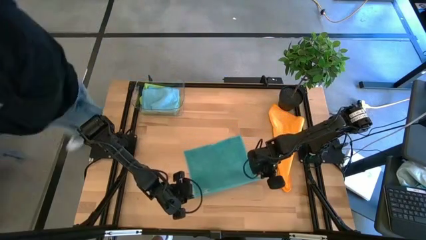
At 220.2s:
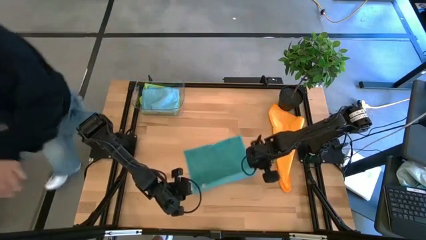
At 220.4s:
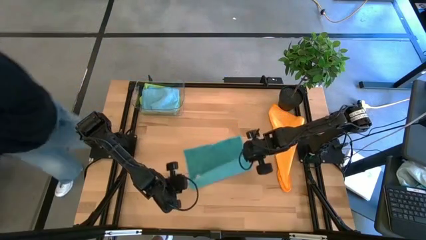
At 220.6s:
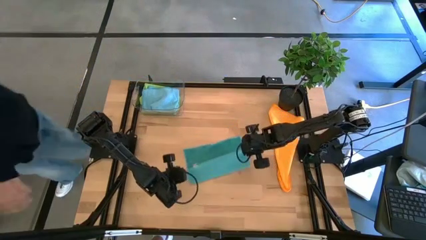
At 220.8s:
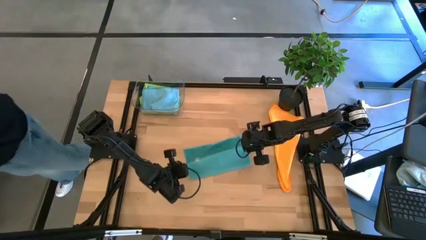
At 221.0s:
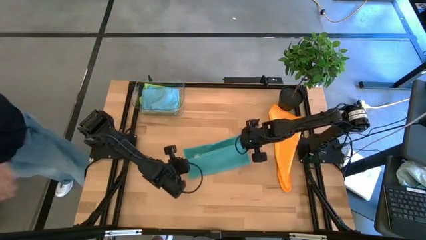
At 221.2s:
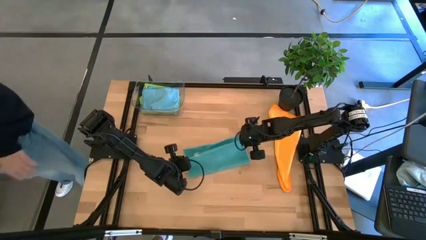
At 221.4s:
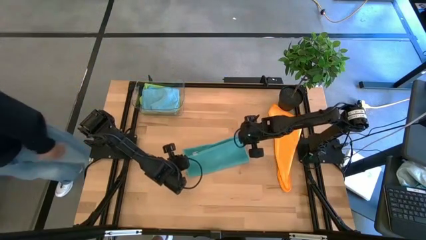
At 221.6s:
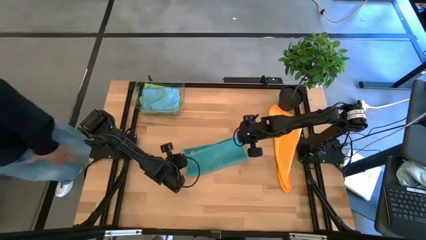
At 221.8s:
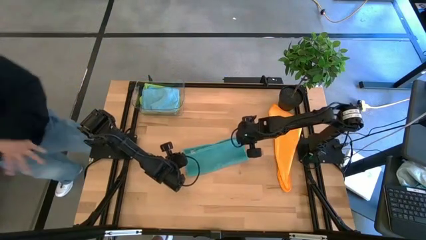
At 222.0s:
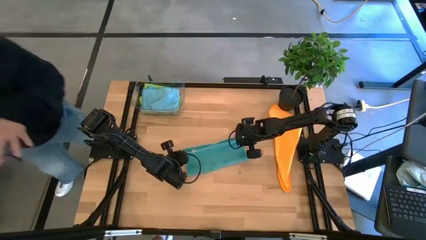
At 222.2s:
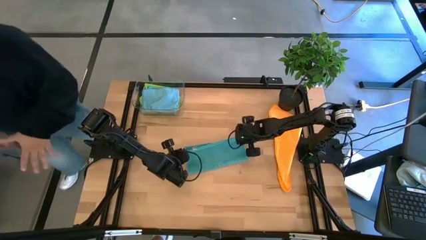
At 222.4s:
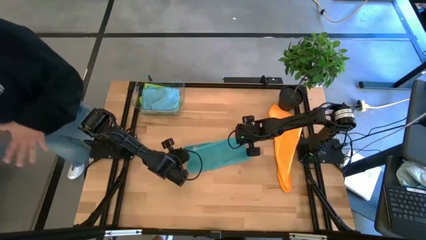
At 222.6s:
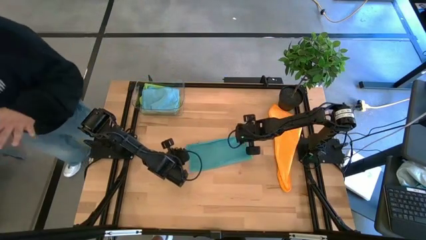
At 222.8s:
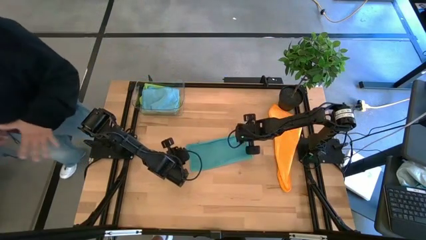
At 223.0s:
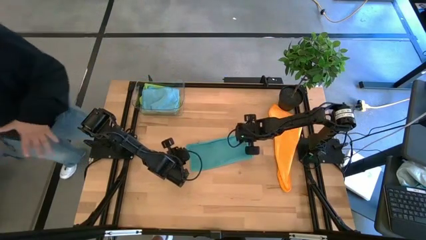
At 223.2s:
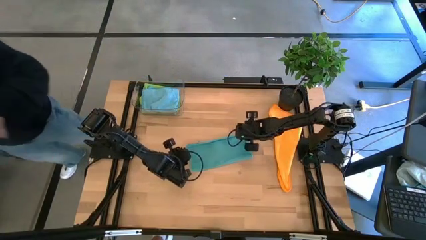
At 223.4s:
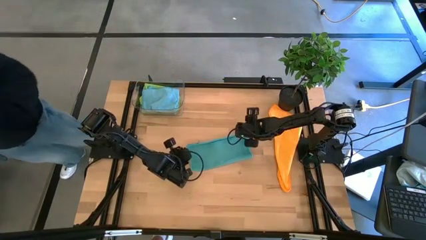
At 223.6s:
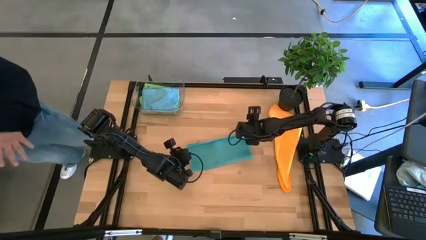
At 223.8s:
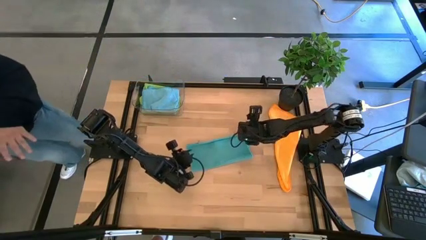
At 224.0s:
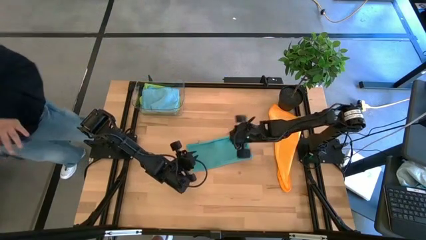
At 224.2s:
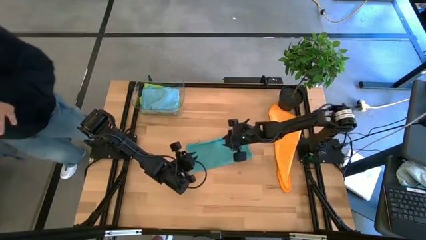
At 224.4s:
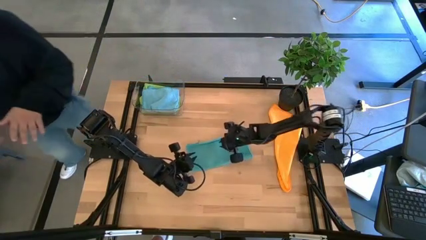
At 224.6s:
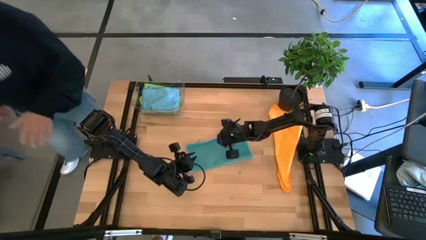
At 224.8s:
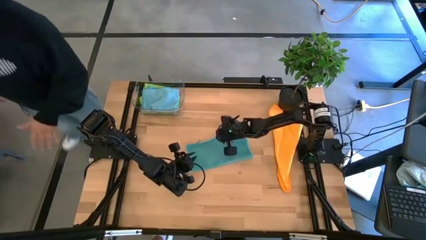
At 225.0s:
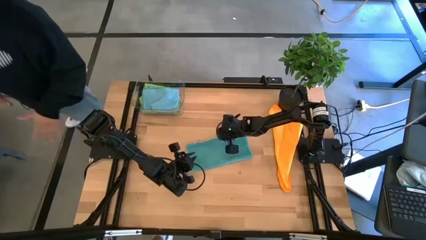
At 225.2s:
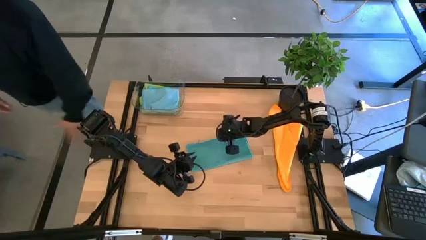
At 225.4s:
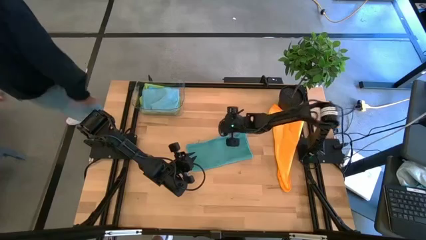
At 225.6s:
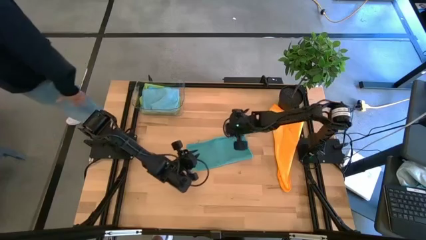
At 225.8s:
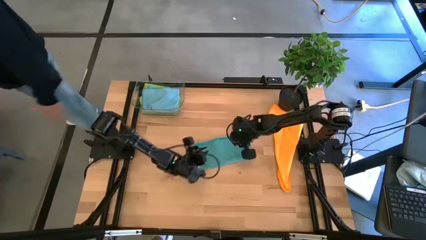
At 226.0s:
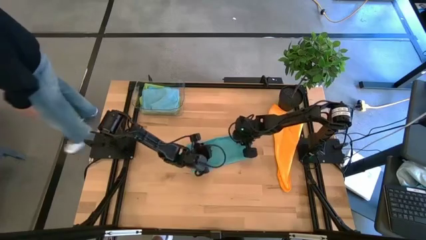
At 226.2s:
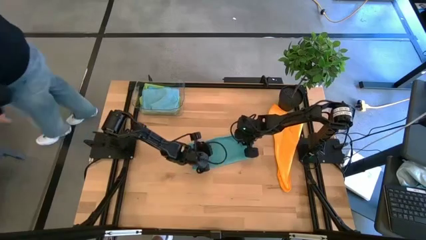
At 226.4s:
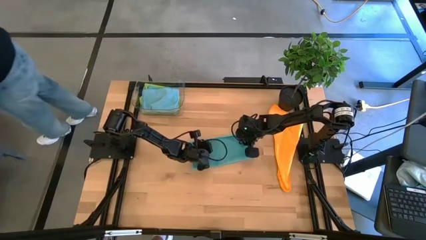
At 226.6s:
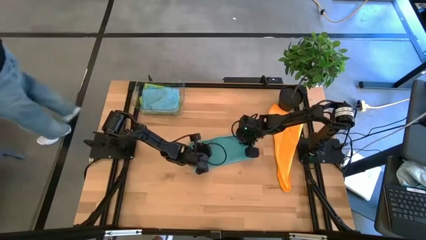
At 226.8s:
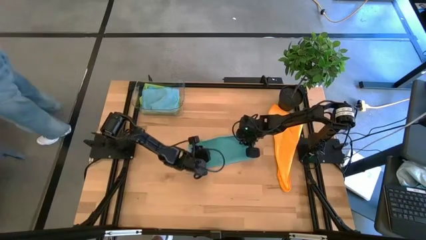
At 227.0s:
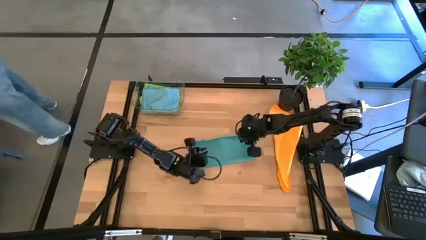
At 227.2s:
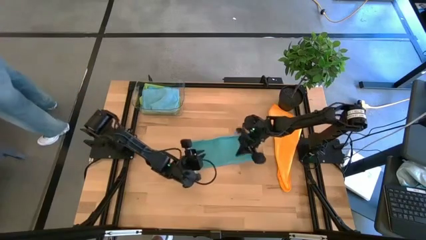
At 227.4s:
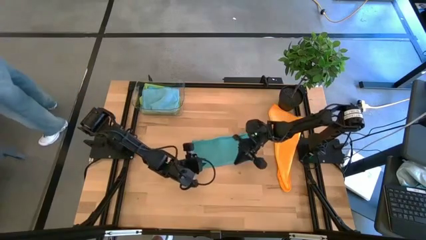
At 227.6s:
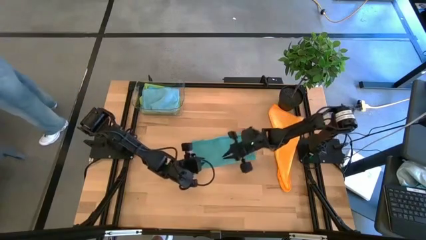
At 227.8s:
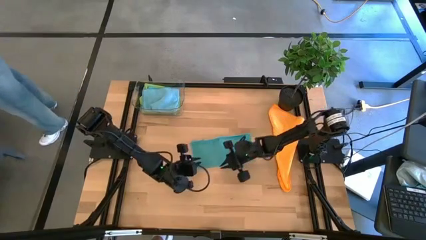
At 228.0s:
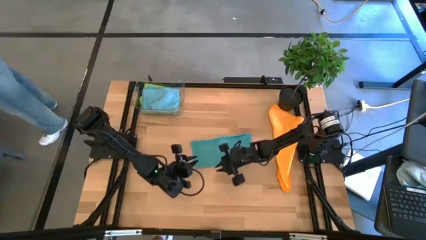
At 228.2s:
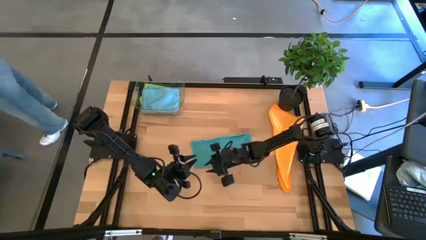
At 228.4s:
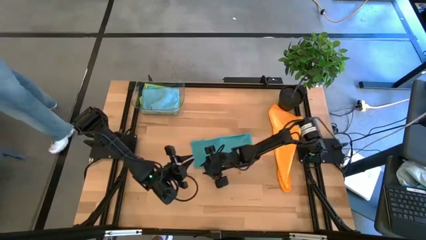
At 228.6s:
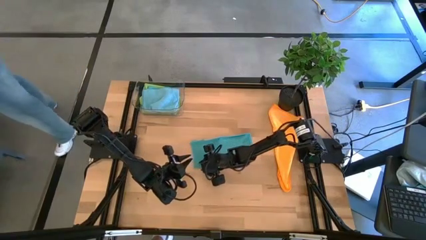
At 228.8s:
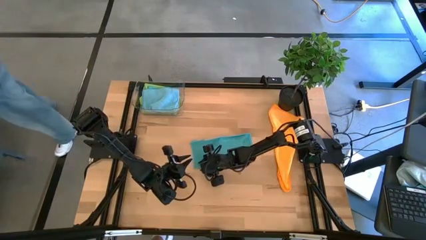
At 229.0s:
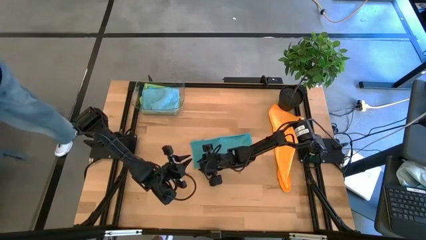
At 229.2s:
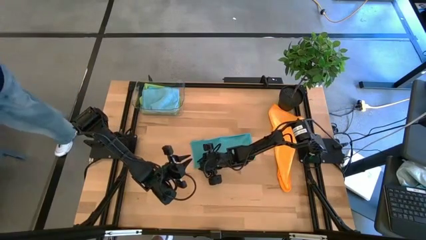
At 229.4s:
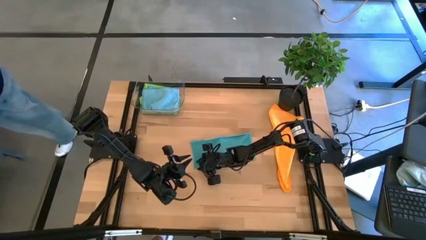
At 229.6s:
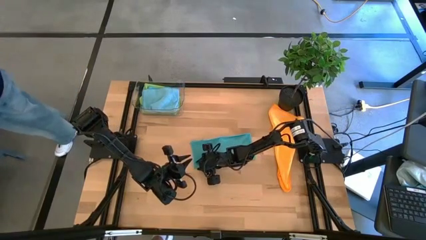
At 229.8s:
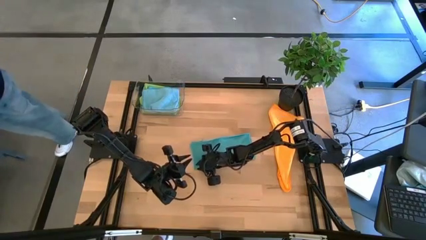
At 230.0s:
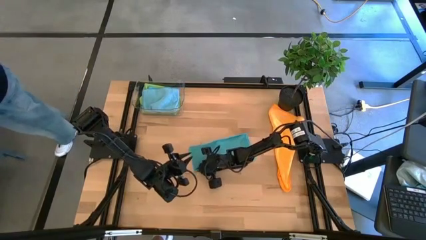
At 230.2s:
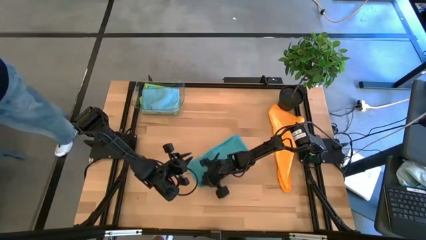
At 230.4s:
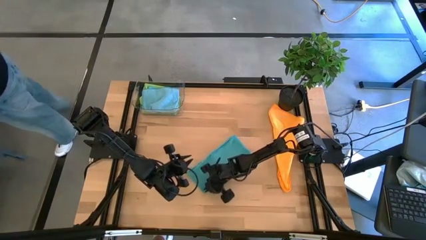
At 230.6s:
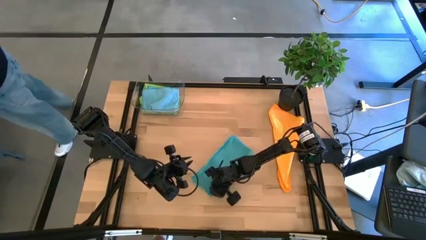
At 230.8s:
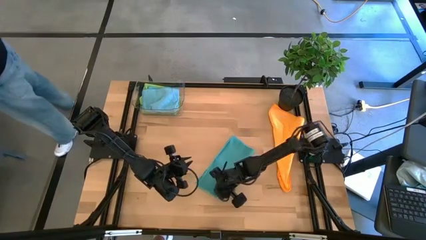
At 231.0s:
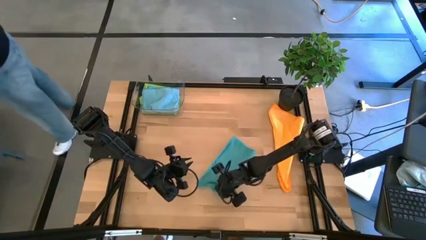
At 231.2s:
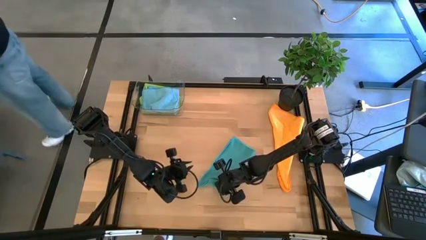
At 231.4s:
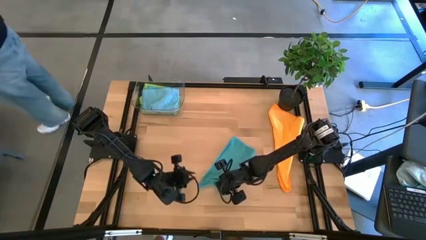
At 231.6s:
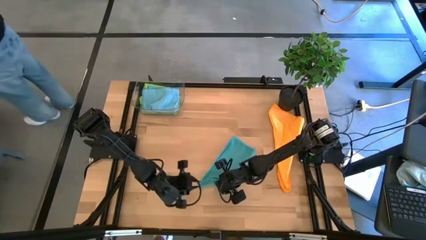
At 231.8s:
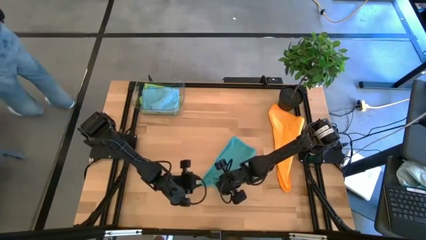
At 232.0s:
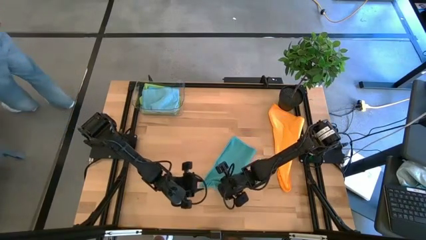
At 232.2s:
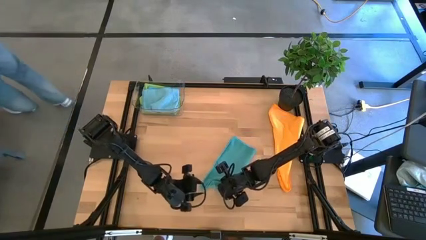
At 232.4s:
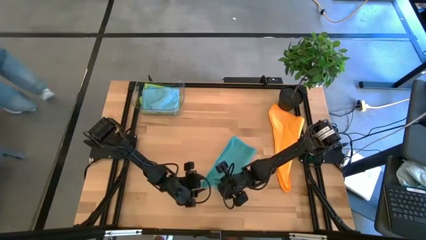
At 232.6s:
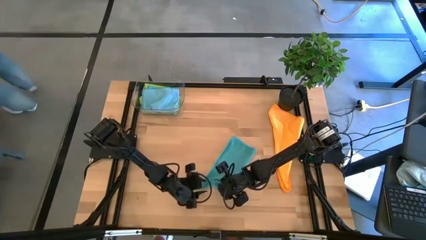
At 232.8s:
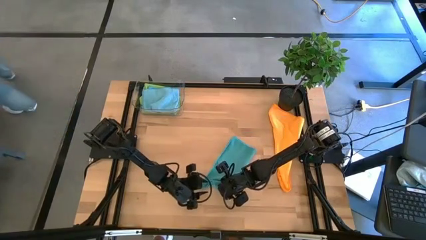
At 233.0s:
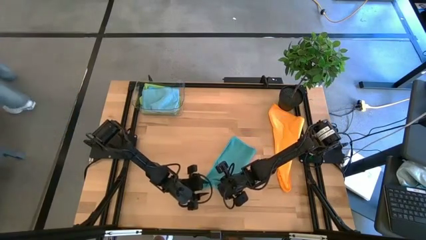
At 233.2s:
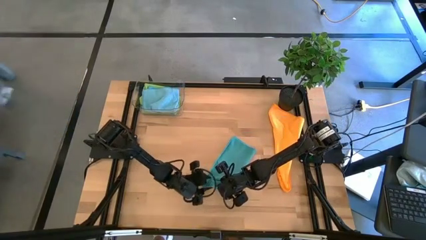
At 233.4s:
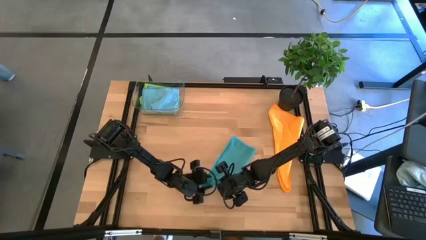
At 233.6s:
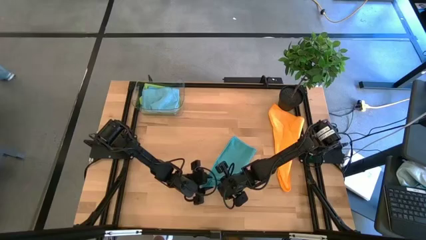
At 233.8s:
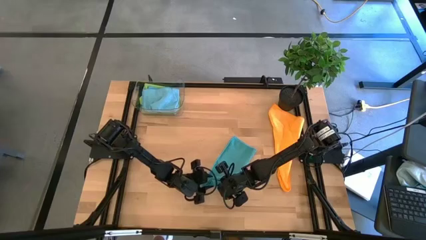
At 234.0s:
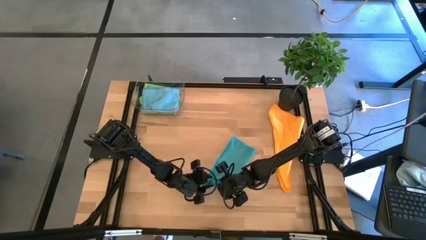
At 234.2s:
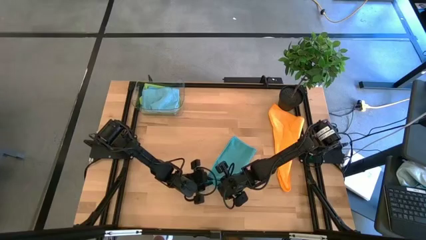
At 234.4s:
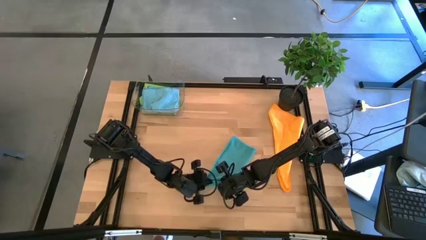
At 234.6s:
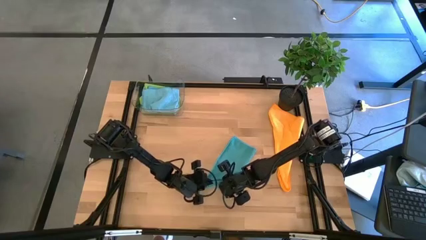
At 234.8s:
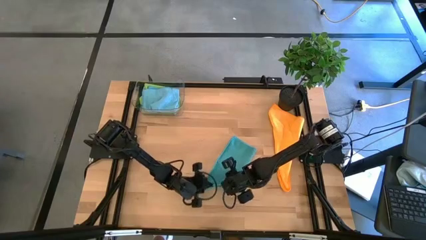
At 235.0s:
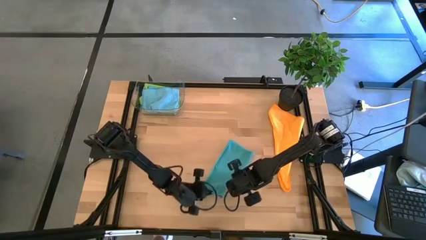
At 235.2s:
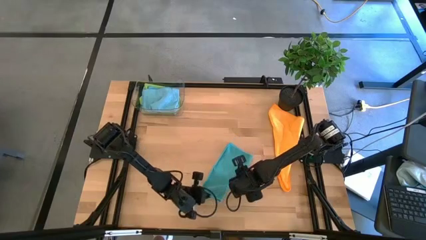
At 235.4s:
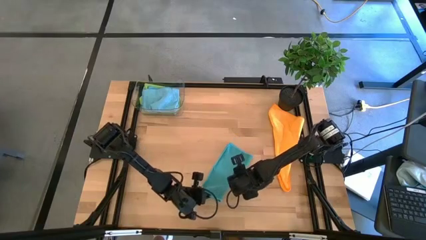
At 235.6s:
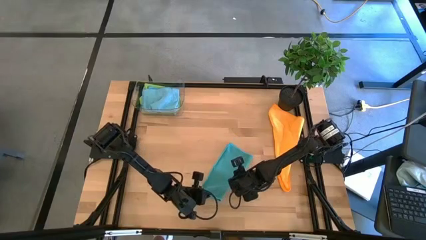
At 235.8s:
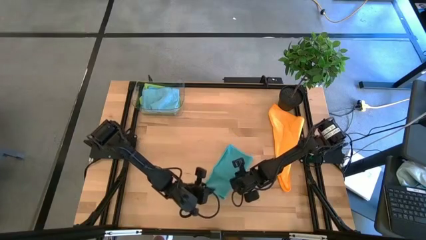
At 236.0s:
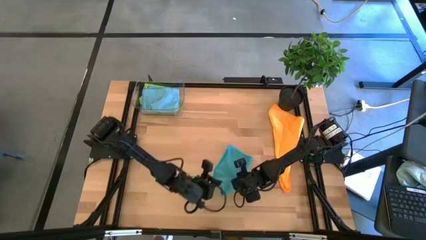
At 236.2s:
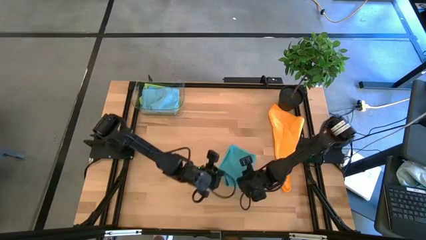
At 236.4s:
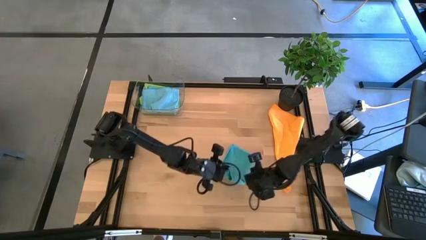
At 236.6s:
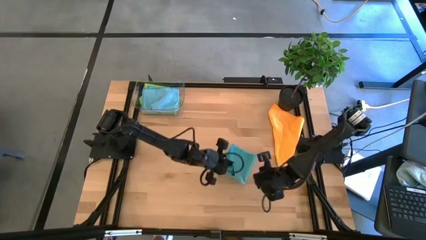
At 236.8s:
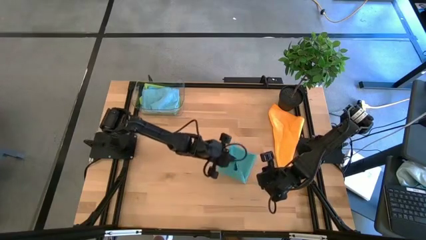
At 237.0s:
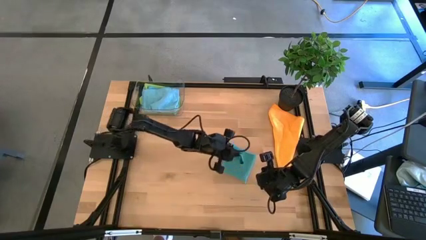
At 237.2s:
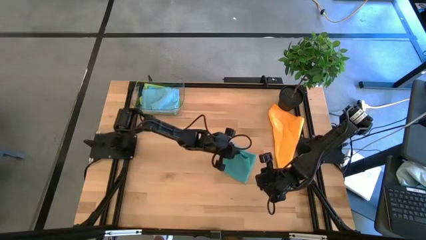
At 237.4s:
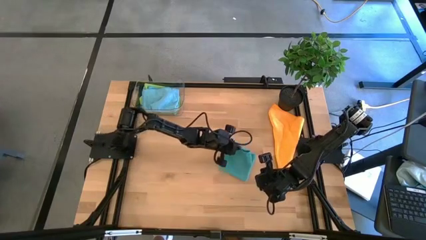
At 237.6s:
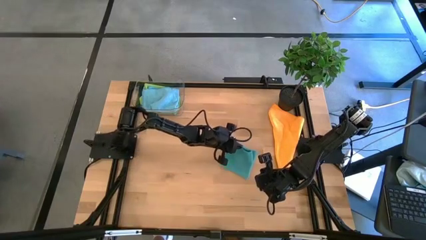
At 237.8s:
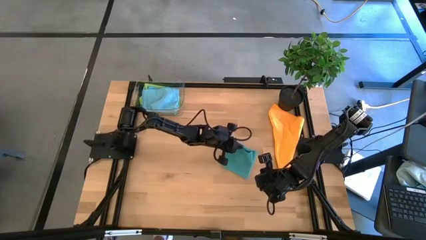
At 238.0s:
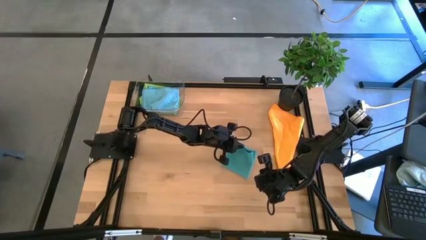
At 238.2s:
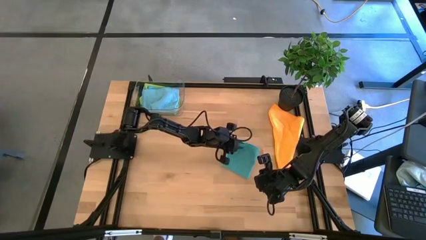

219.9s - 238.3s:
Task: Fold microfiber towels
Fold the blue microfiber cloth
